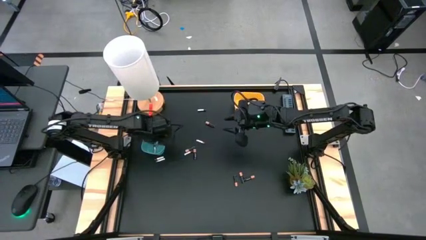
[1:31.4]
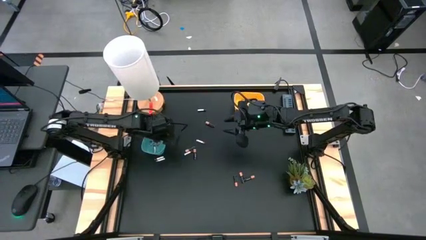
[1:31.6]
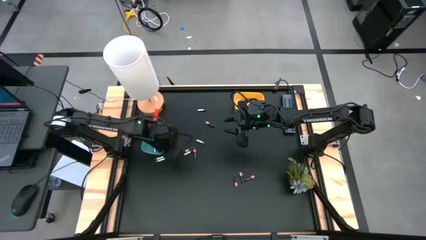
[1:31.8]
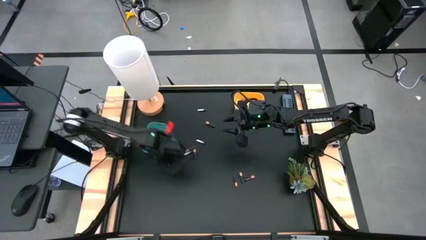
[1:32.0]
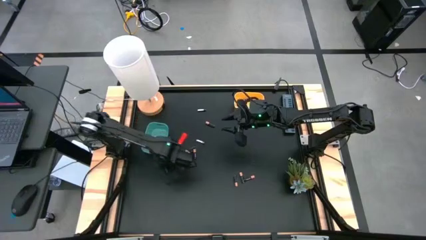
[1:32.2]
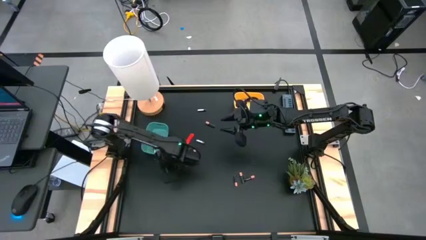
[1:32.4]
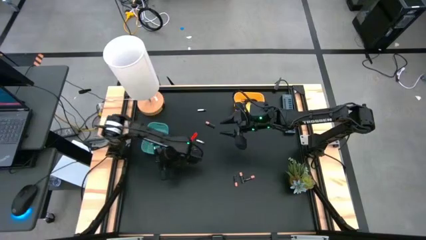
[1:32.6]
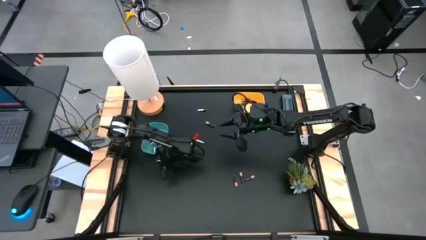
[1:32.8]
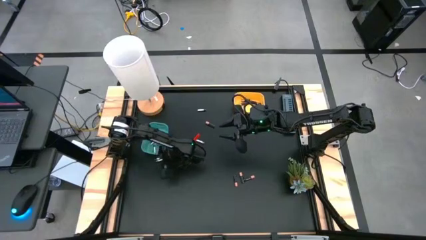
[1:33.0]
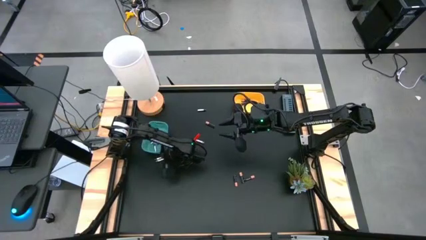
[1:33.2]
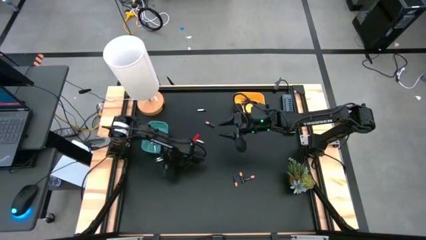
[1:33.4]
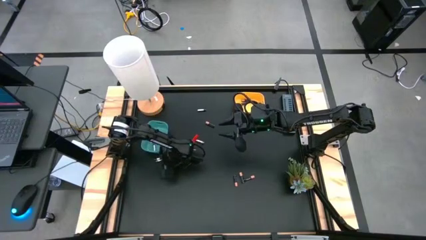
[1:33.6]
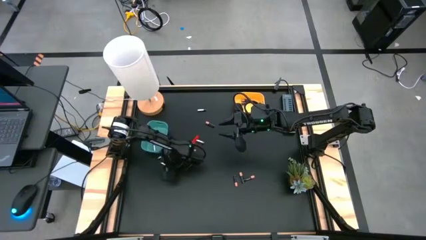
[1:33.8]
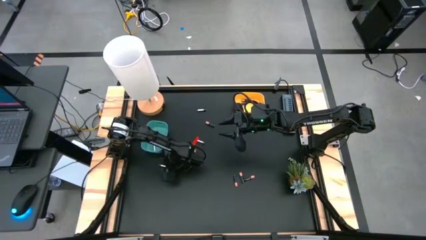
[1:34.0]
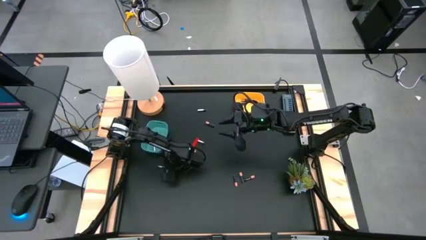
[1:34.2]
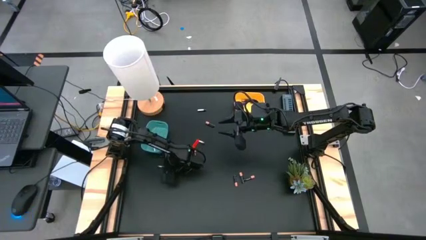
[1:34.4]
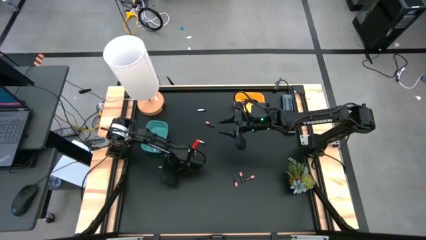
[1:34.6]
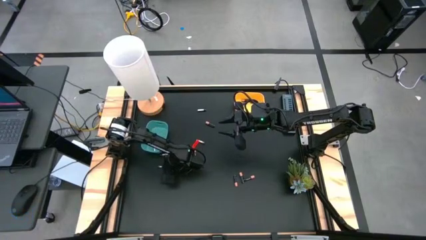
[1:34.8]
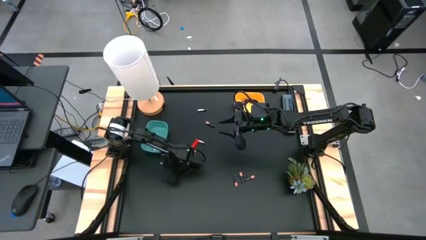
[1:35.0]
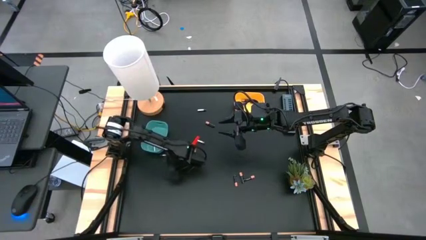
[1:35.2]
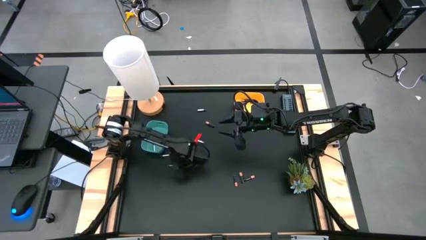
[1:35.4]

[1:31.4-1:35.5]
Task: Sort batteries
Put the silver battery into the green bin

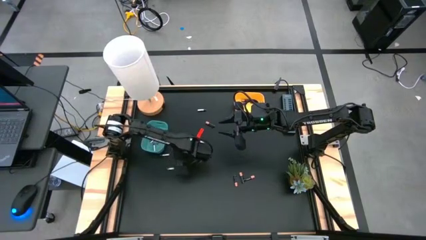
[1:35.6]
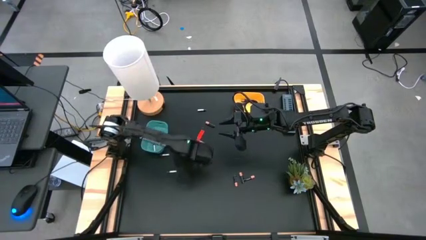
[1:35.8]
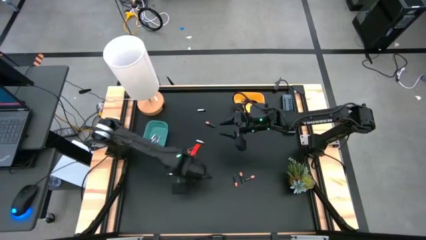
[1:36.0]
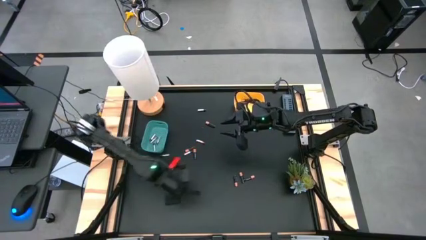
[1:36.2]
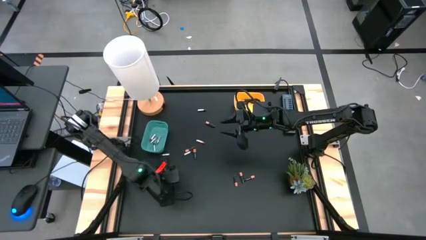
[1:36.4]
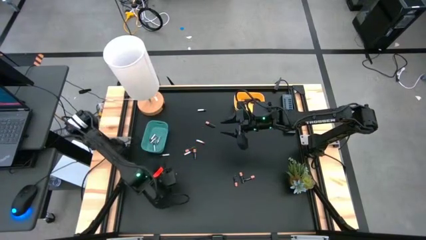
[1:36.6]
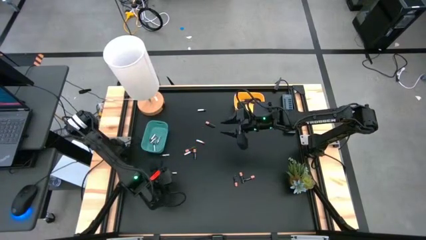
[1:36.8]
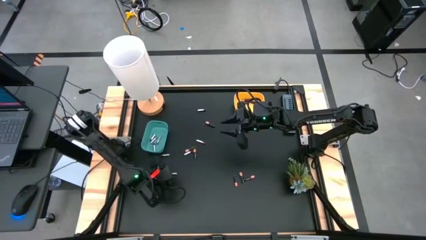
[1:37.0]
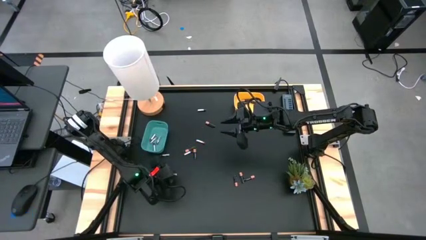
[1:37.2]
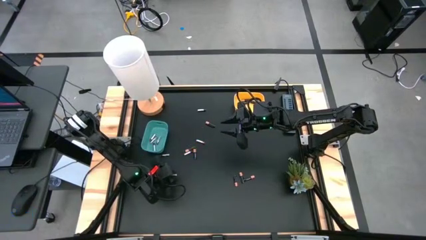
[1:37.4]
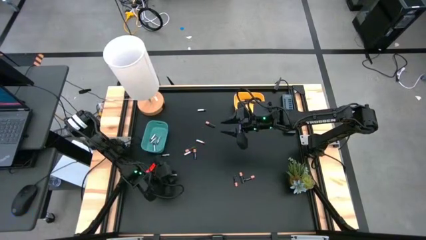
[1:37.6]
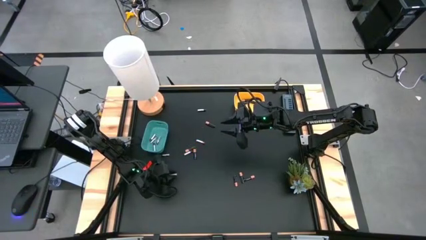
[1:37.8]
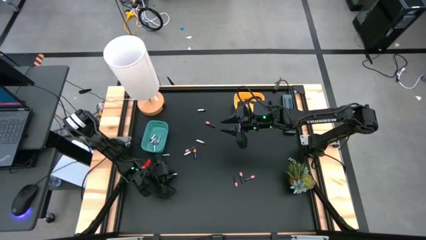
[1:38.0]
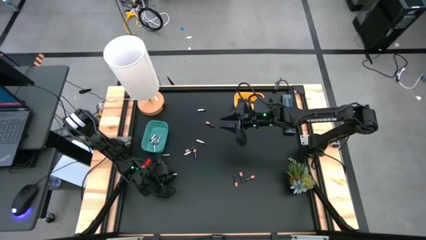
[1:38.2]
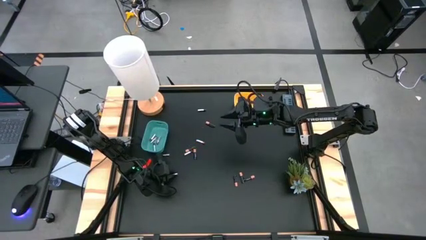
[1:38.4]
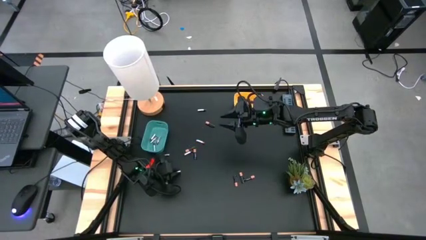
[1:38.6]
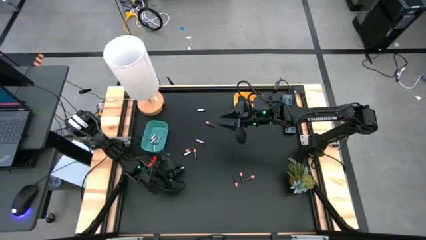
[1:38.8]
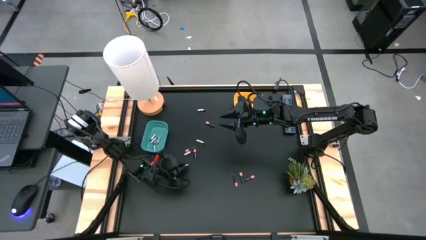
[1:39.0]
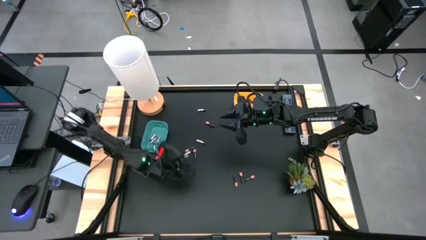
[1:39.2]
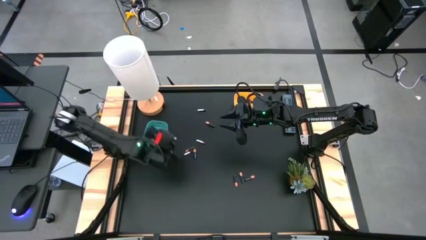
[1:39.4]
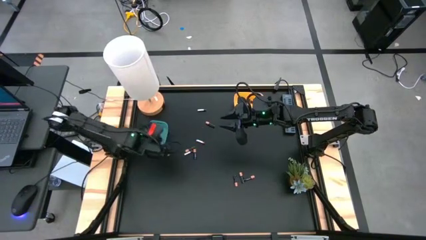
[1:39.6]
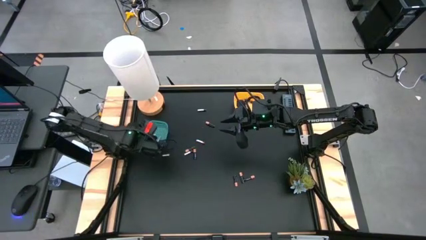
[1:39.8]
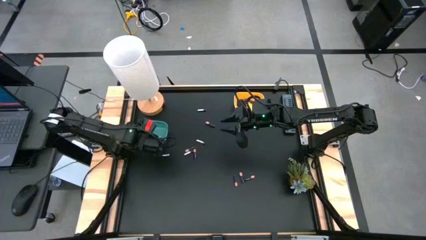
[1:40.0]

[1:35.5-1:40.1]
Put the silver battery into the green bin

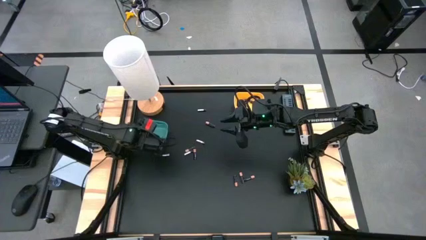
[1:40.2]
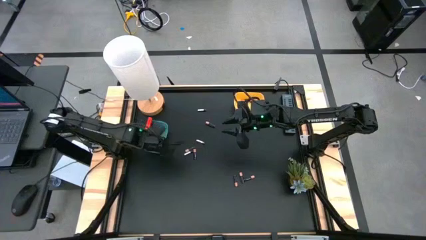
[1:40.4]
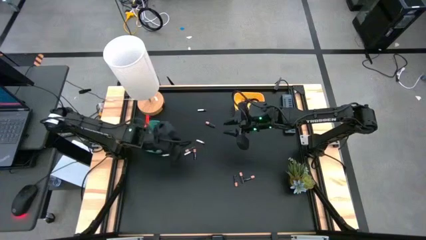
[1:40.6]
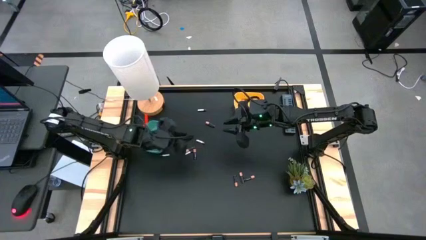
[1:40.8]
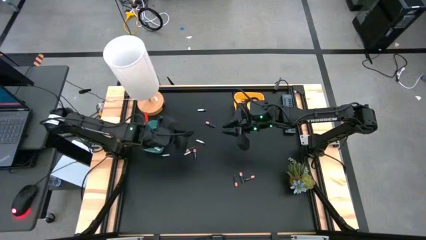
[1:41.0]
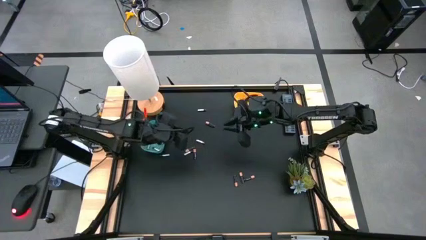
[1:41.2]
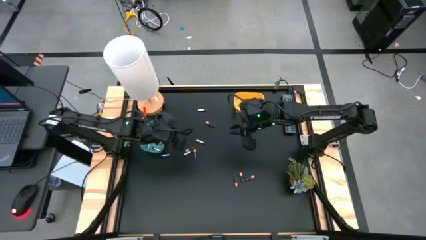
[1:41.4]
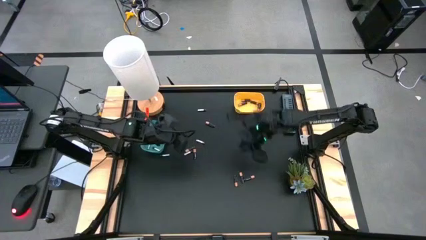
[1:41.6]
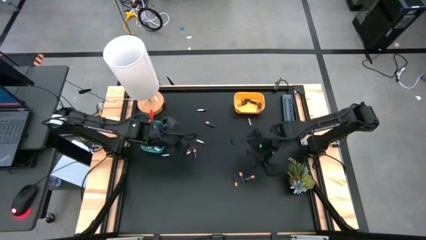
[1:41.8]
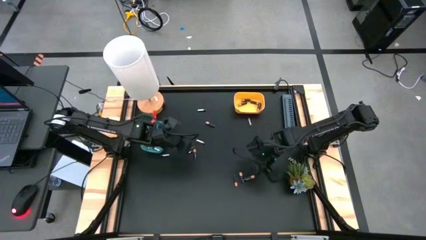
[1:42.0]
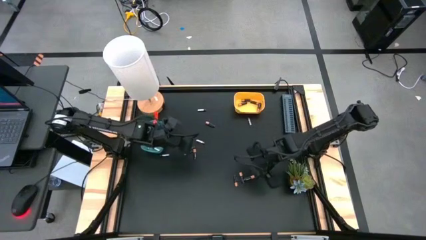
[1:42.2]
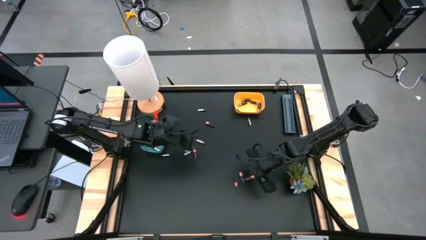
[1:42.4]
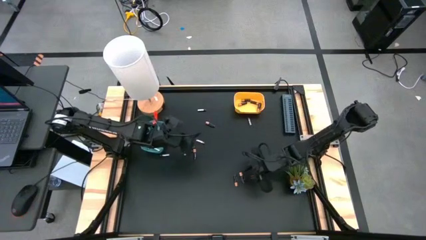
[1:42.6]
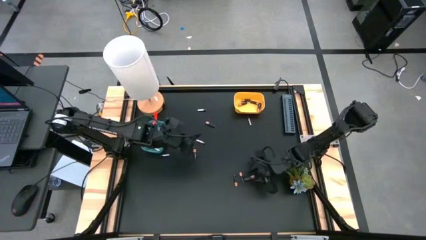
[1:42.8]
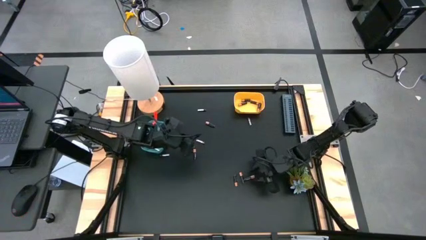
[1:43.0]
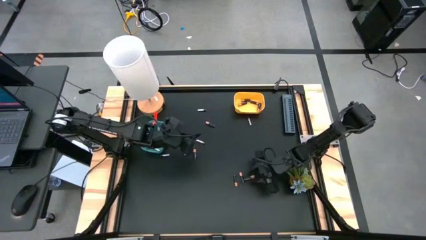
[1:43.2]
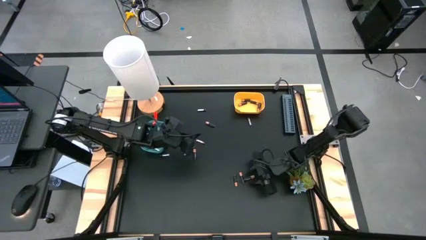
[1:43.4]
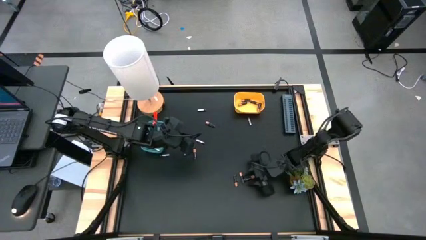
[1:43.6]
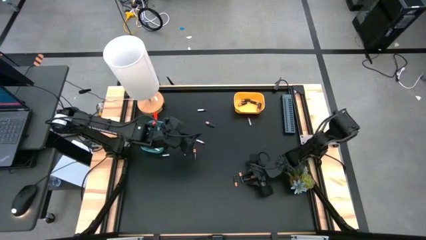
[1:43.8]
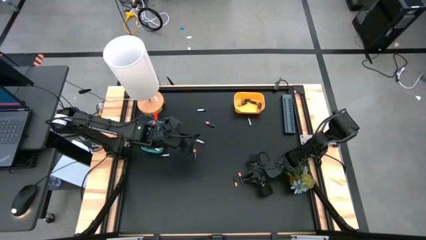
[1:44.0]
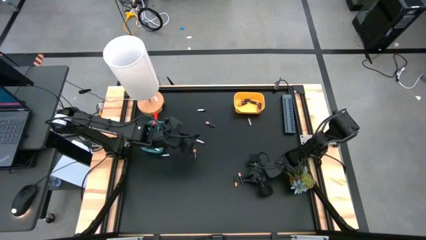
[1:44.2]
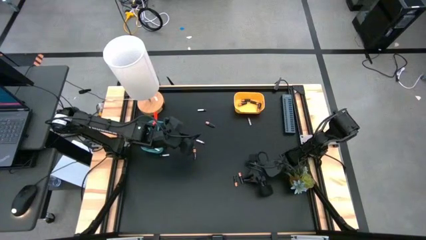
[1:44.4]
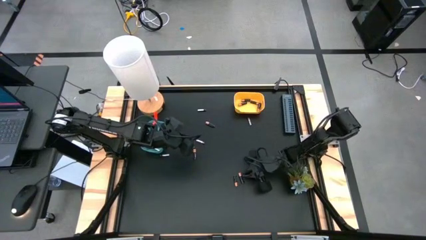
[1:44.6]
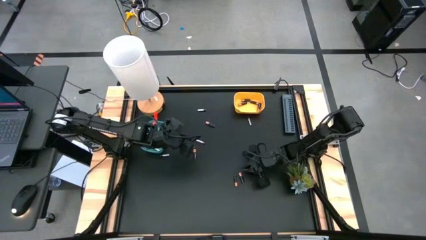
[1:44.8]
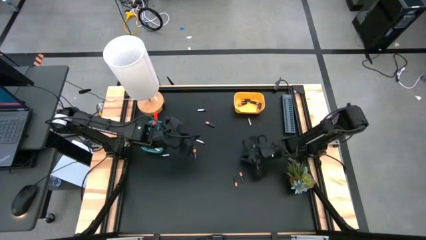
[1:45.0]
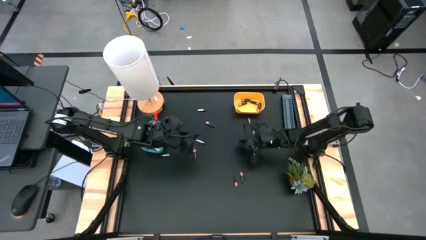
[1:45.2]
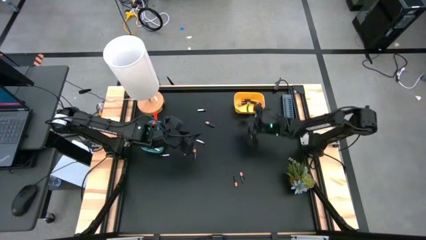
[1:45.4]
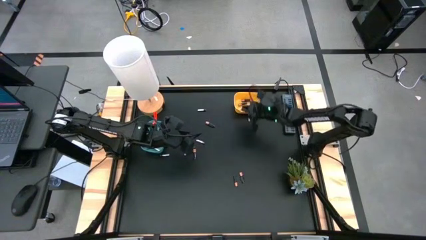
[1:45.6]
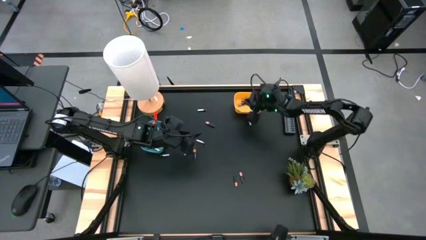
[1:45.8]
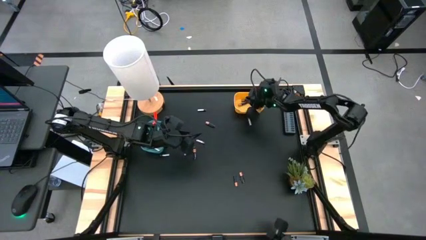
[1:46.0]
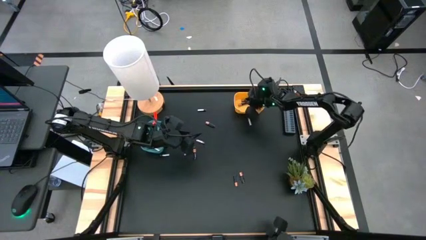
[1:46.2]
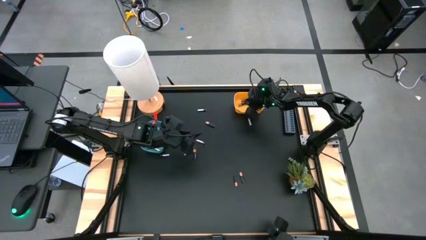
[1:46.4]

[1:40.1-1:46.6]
Put the black battery into the yellow bin

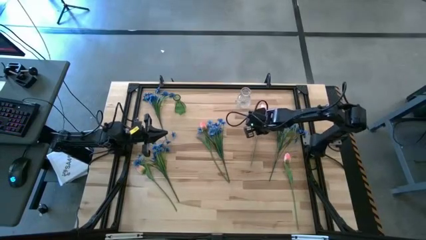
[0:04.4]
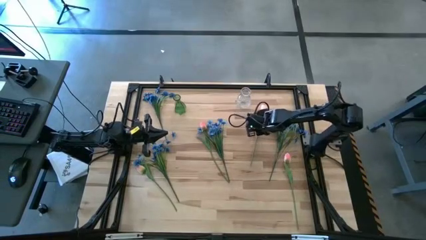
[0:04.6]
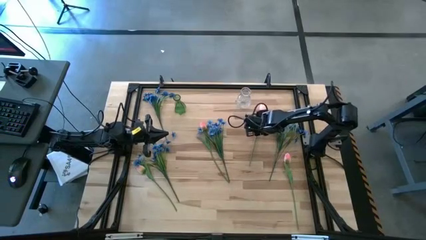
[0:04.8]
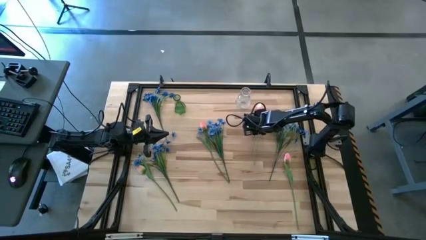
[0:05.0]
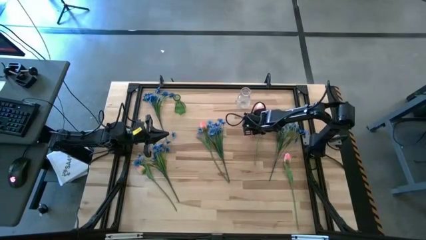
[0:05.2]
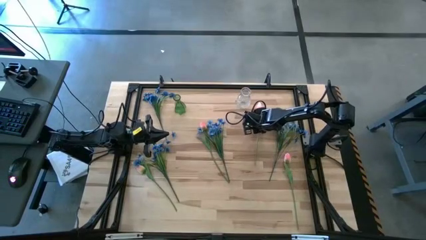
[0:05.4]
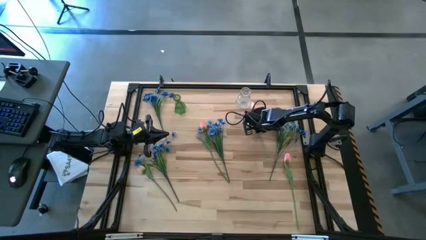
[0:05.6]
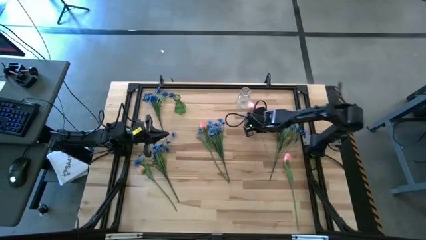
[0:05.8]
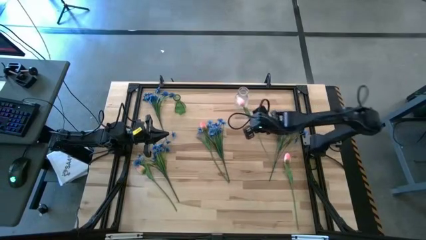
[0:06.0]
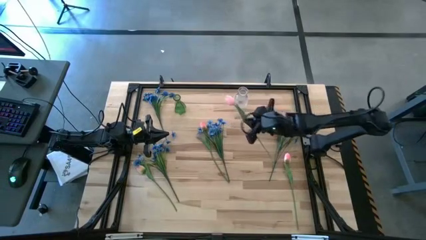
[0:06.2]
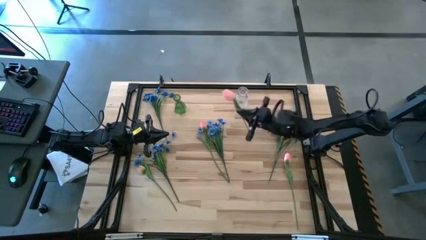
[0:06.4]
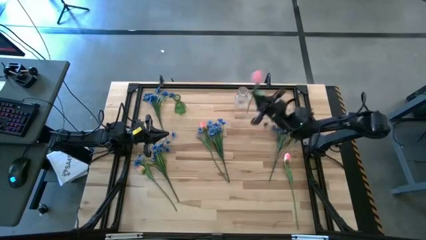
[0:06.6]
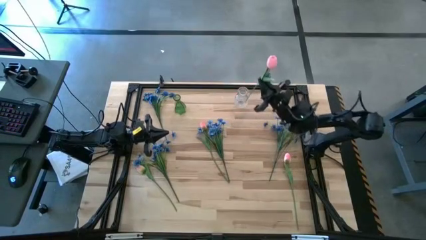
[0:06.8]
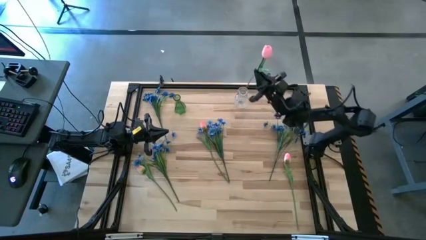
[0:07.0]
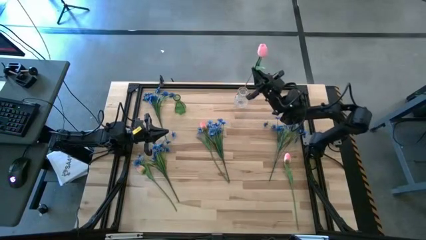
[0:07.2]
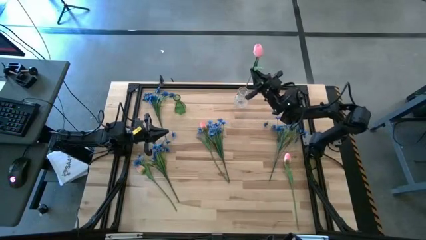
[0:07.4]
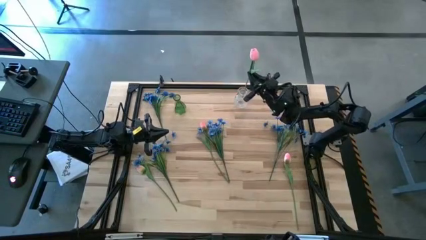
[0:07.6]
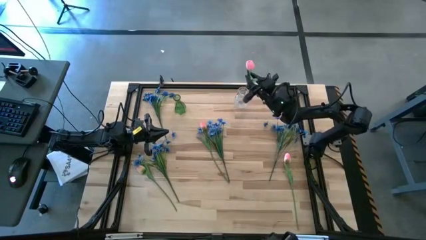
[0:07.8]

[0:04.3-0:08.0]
Task: Sort flowers into vase by color
Put the top right pink tulip into the transparent vase
